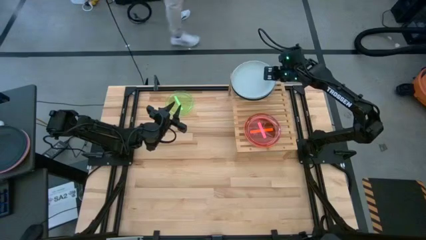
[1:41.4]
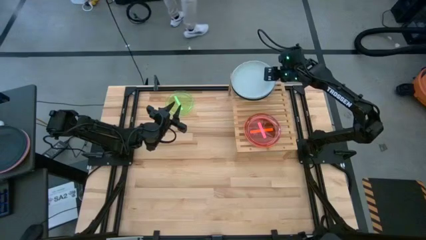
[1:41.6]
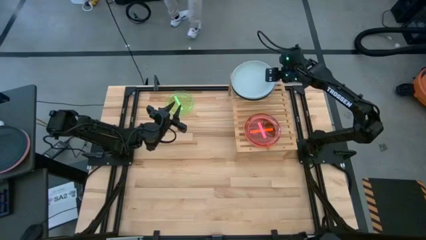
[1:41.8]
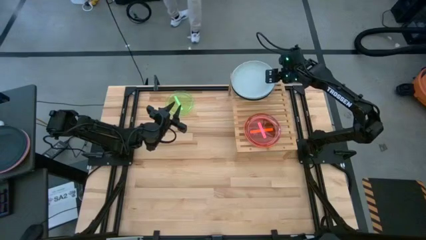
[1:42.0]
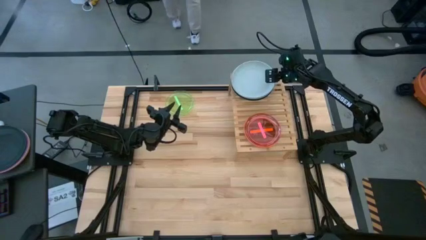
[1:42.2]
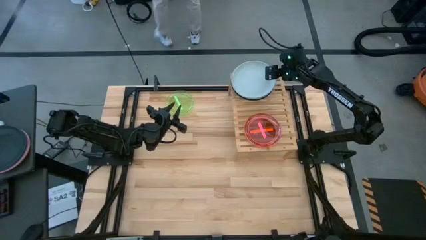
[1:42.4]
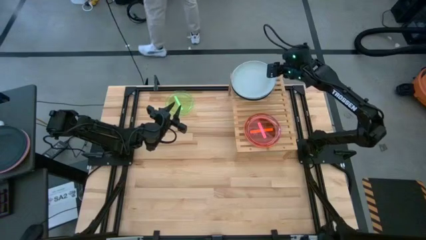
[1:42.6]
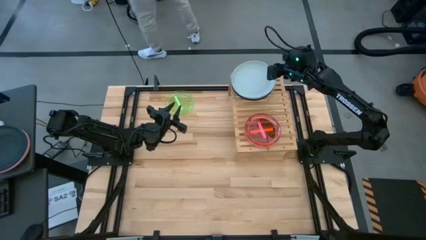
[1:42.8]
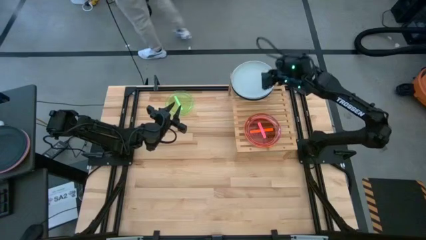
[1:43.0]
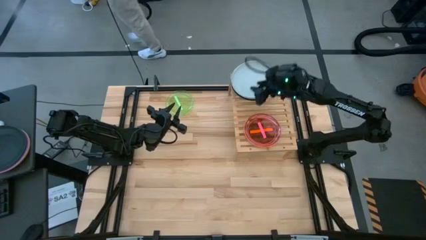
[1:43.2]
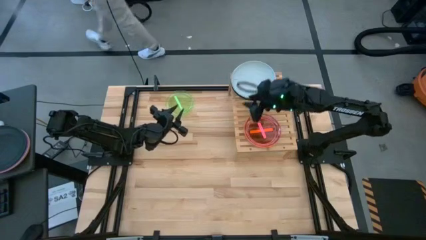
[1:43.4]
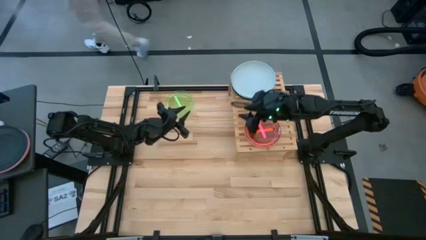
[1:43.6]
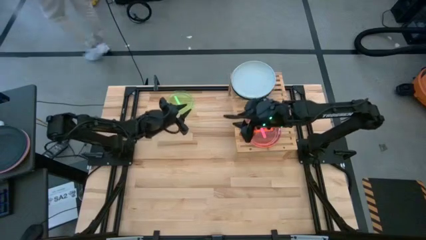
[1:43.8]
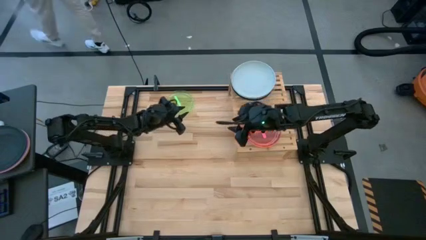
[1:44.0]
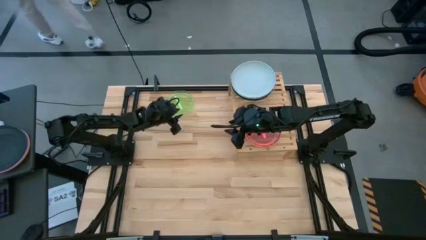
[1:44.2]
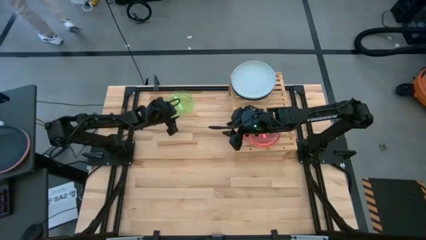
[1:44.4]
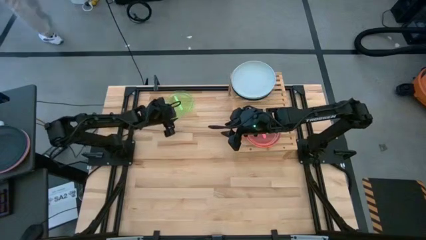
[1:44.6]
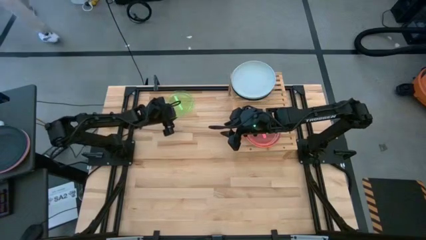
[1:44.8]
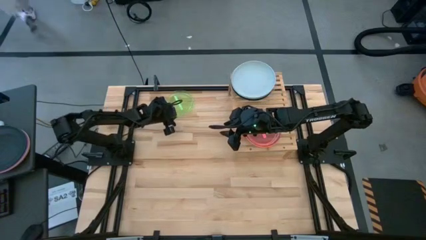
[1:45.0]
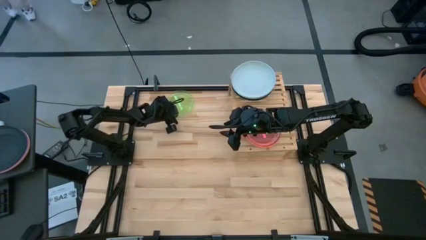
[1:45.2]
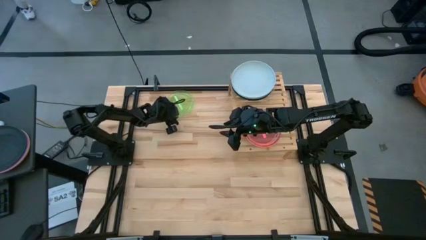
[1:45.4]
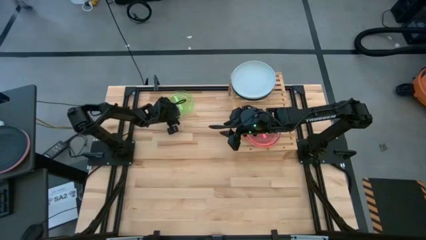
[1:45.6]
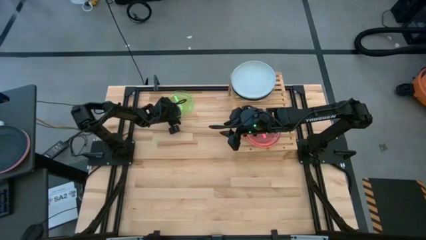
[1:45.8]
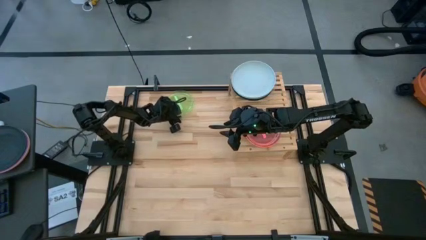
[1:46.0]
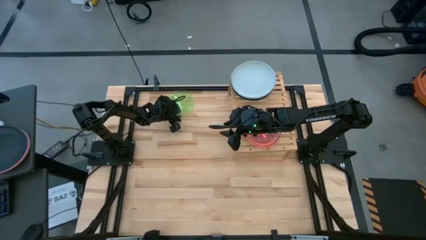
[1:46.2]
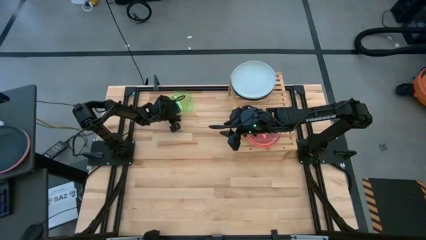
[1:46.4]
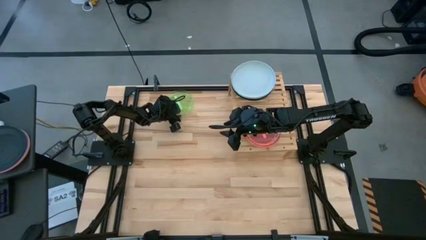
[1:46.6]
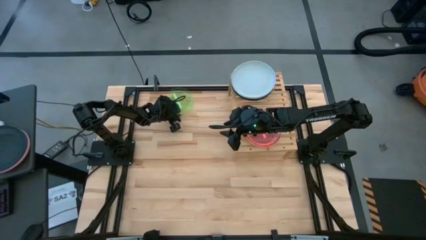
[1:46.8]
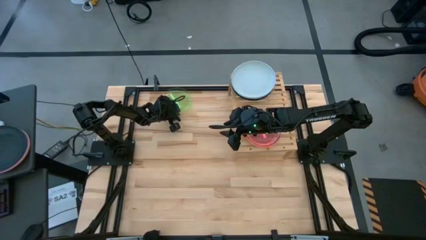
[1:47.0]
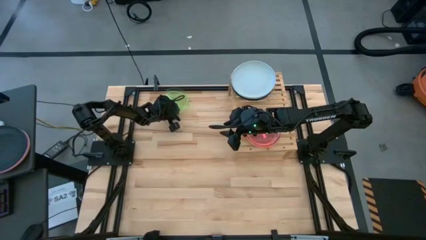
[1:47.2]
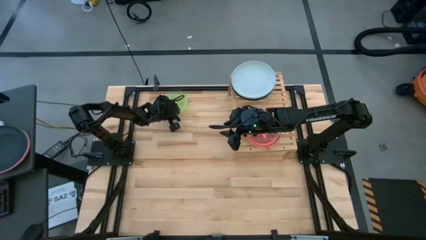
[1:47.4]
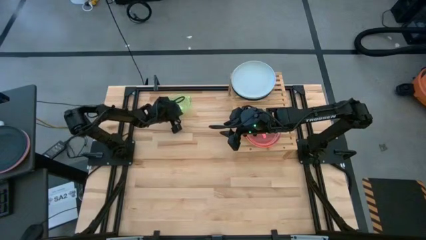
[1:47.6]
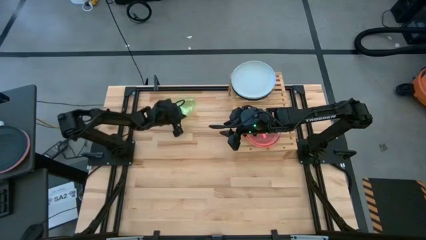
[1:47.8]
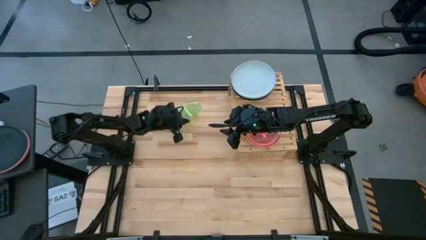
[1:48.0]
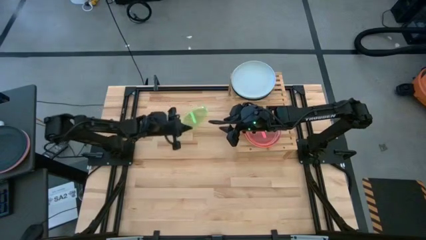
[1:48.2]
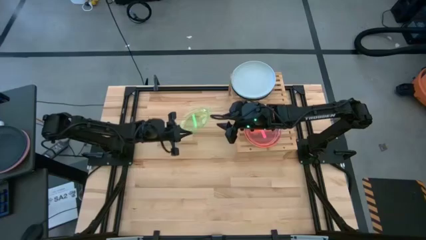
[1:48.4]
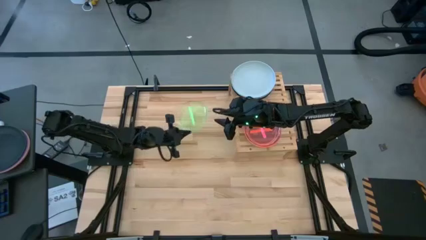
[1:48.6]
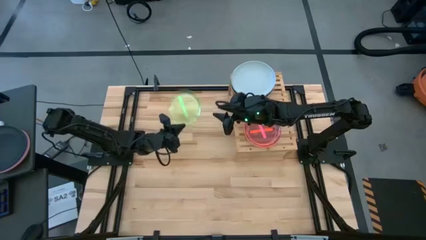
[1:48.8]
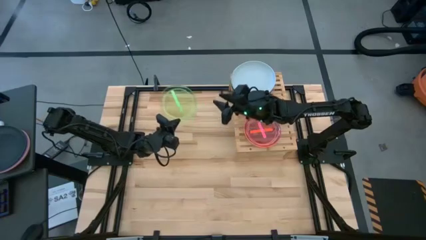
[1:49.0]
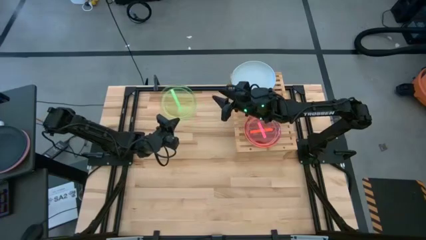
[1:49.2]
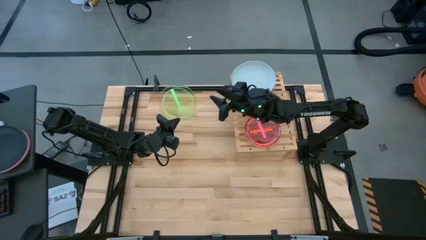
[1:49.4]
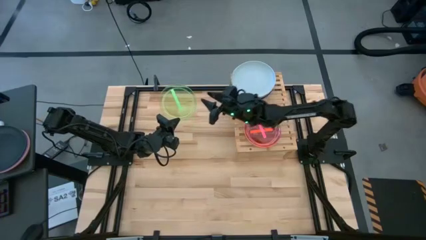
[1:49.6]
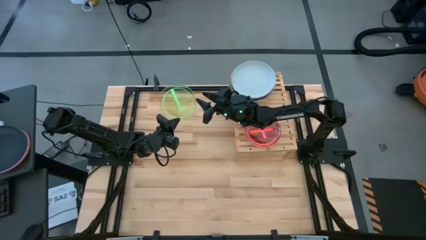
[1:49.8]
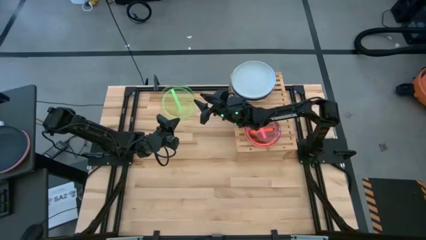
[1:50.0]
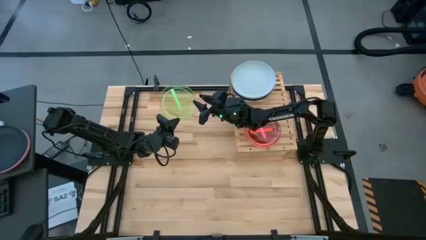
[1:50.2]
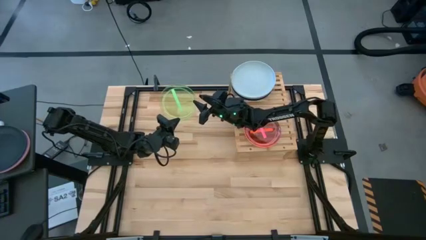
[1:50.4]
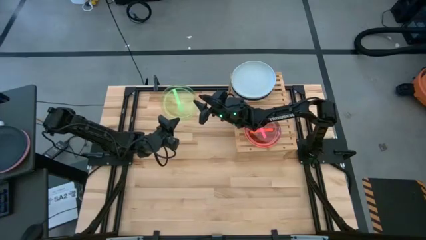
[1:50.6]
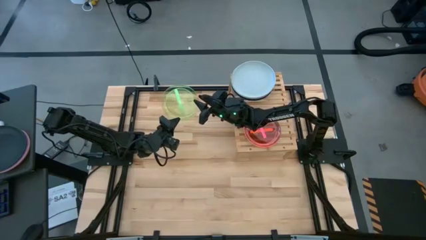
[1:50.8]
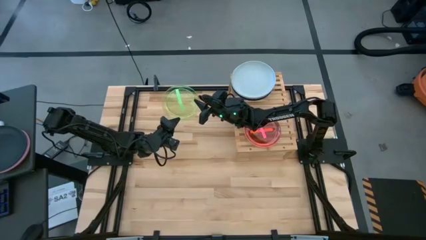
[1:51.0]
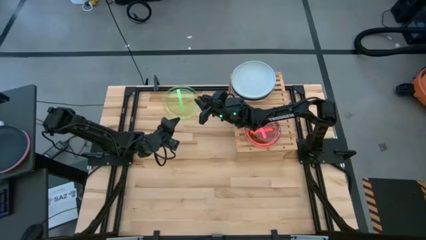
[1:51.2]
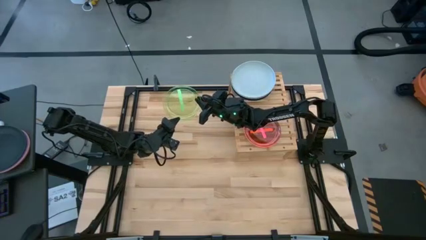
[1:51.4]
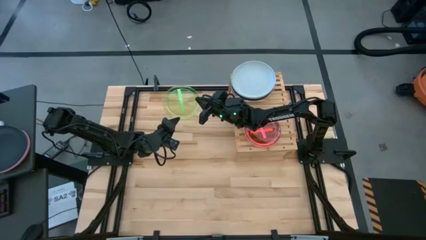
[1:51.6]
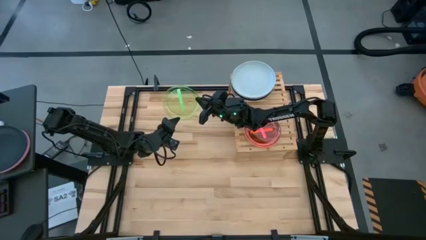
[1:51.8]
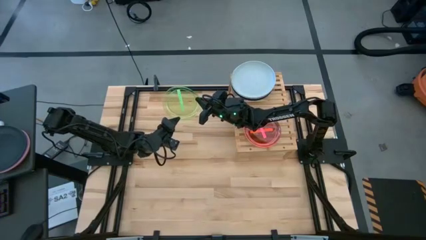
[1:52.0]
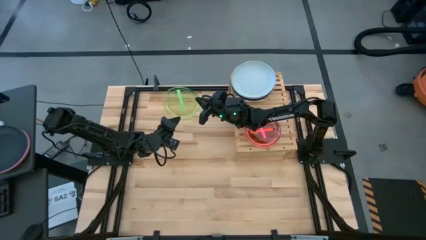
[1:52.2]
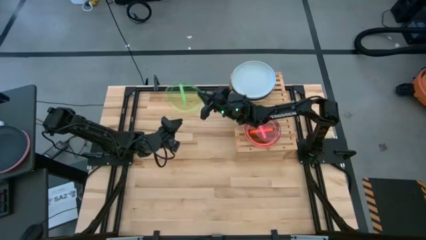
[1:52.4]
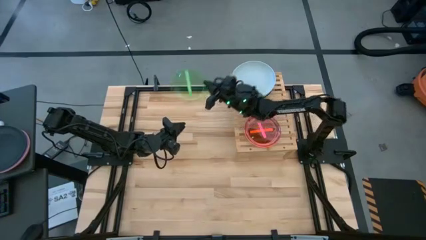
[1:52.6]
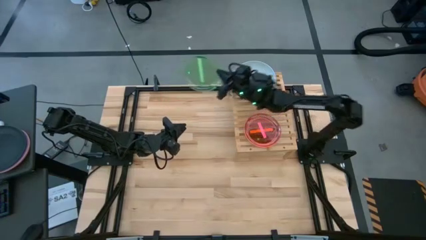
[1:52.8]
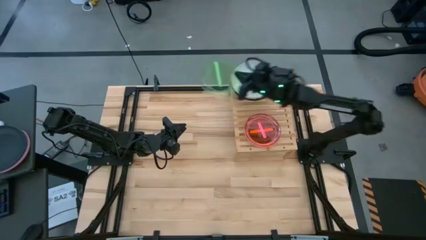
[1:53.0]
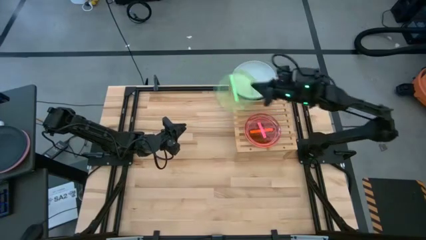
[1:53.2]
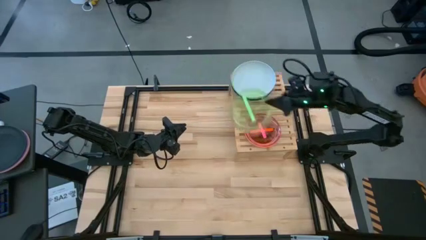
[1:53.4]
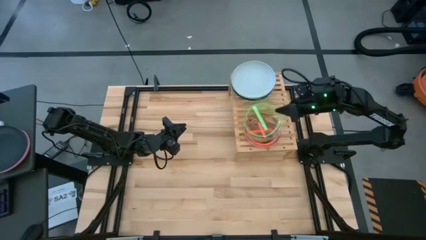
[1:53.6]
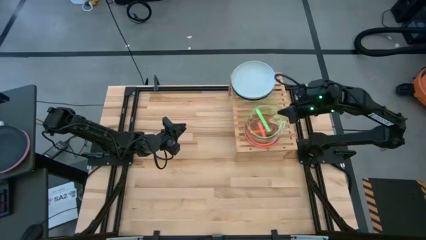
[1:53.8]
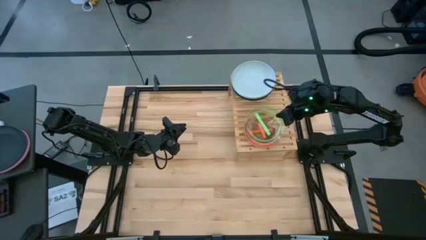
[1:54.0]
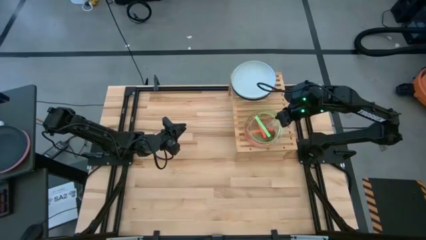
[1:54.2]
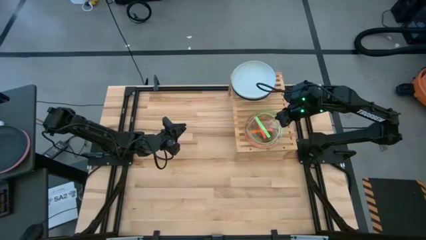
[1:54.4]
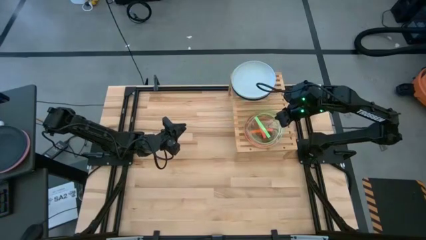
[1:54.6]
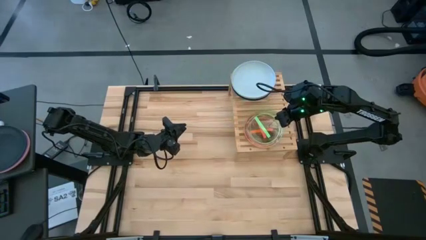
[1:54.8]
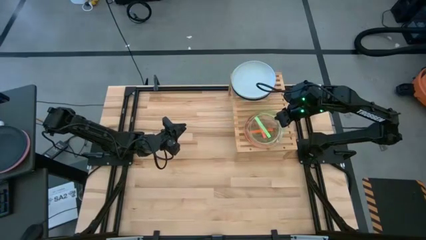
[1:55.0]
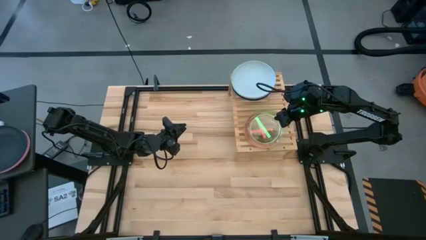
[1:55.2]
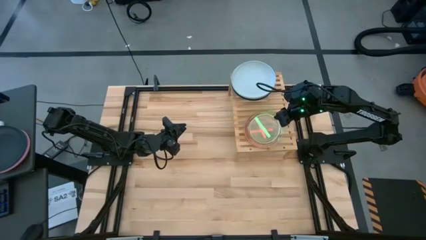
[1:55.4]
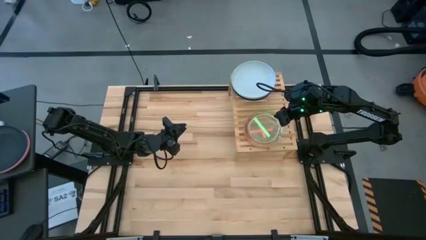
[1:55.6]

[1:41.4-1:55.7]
Task: Place and stack plates onto a shelf
Stack the light green plate on top of the light pink plate on the shelf
